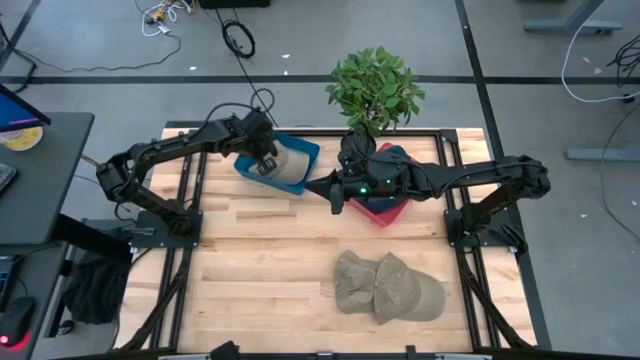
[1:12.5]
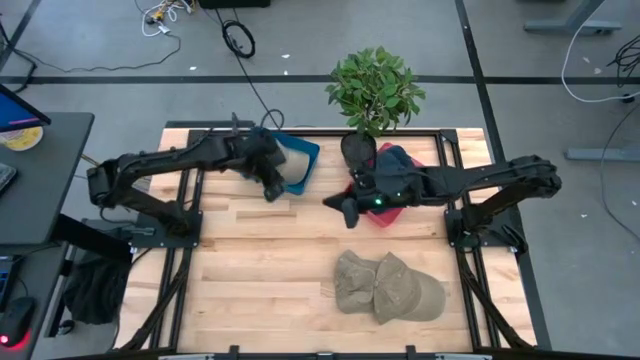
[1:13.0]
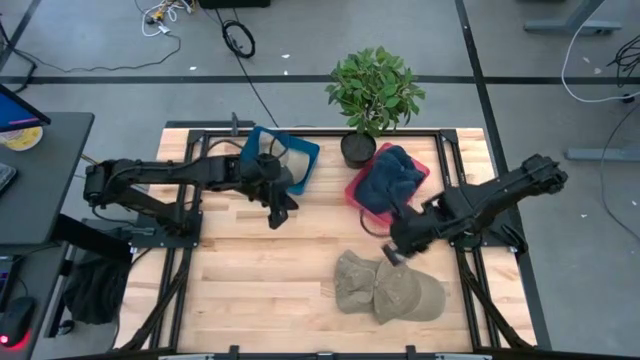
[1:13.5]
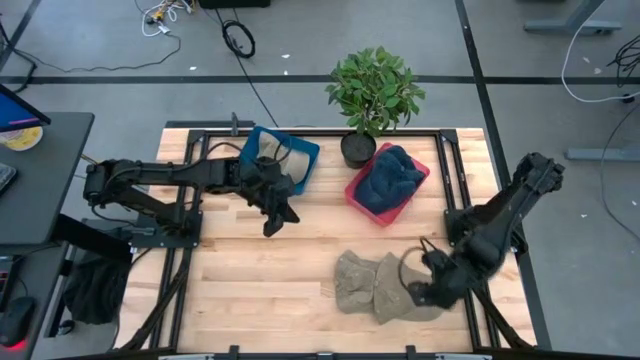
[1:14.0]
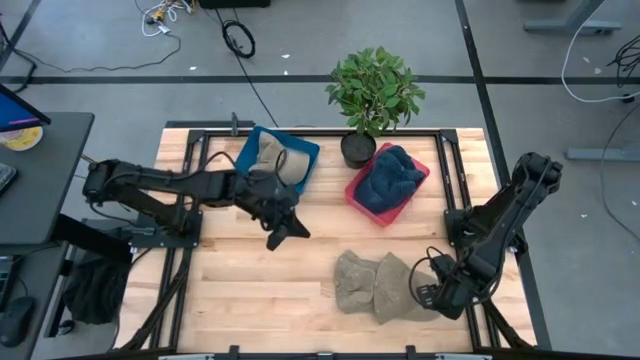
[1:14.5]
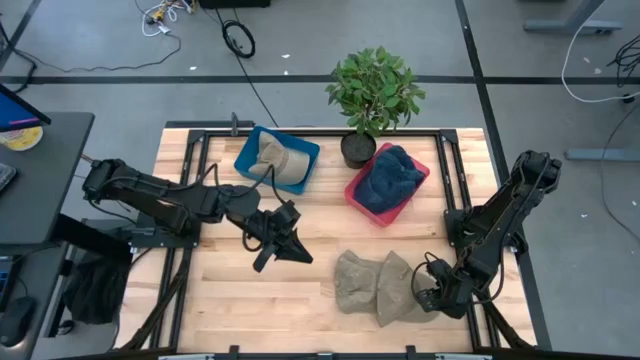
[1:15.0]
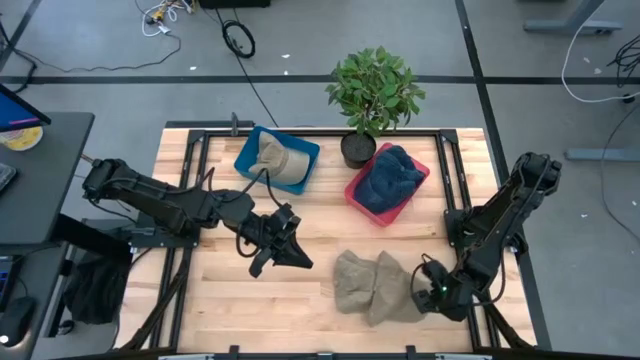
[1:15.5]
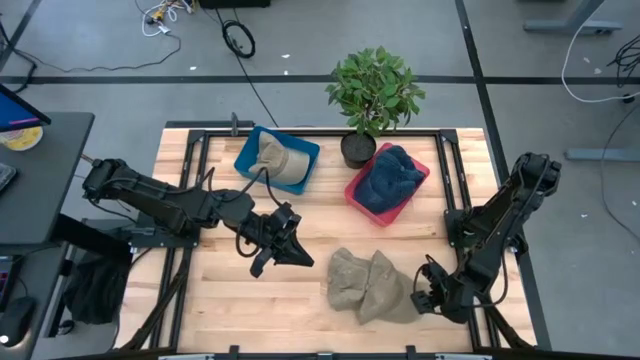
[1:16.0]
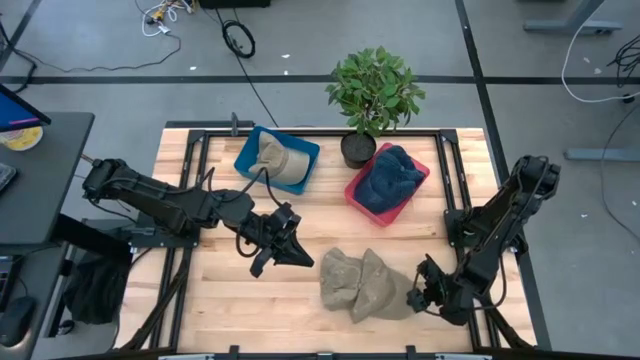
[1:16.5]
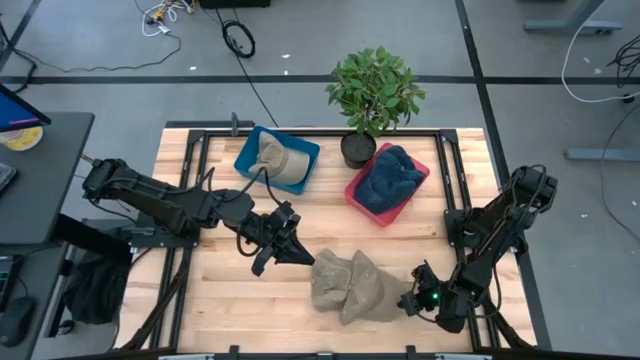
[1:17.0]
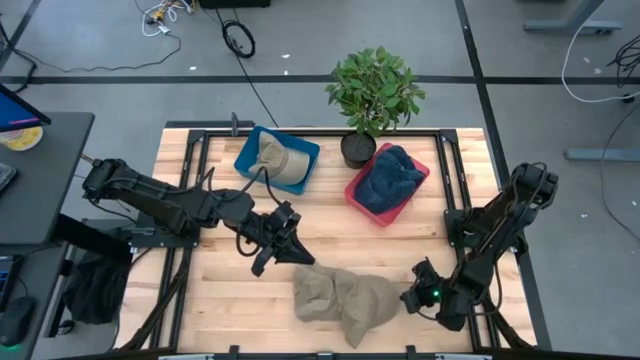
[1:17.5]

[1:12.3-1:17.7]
Task: Pick & Place hat
Put the right brown cap into the blue bin

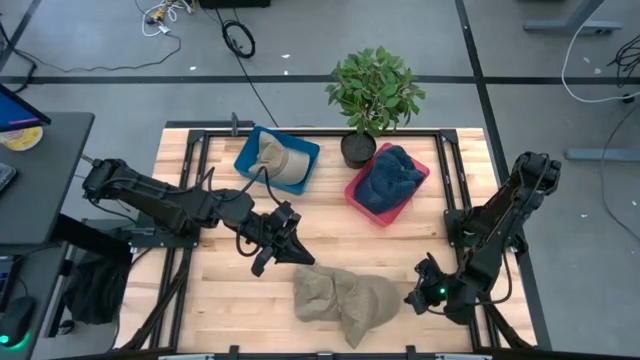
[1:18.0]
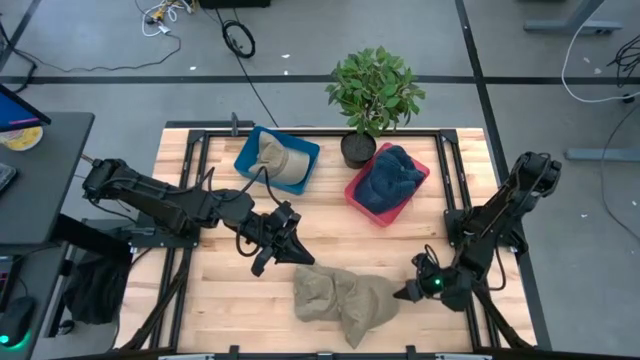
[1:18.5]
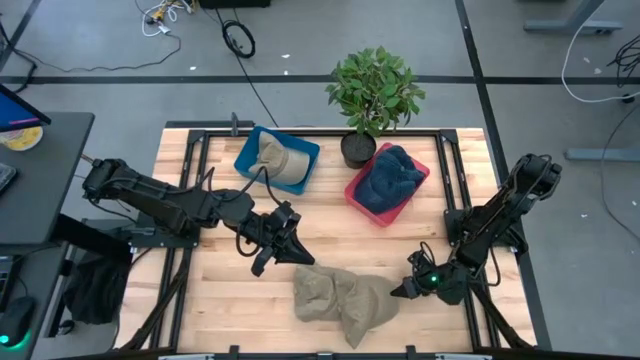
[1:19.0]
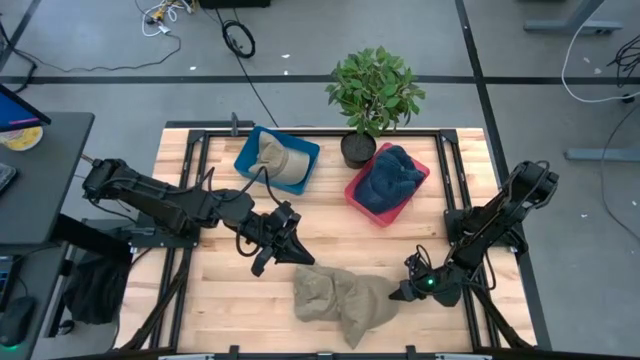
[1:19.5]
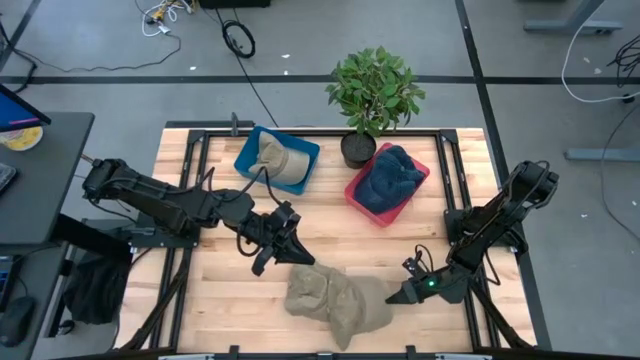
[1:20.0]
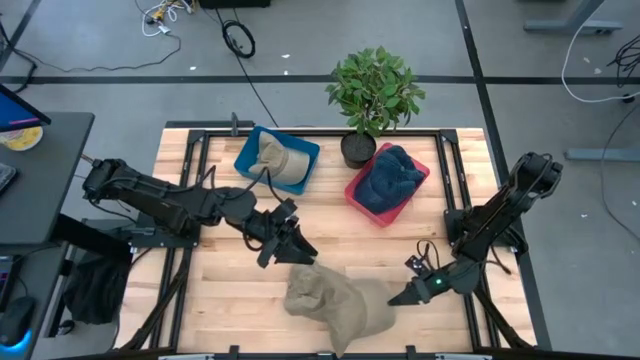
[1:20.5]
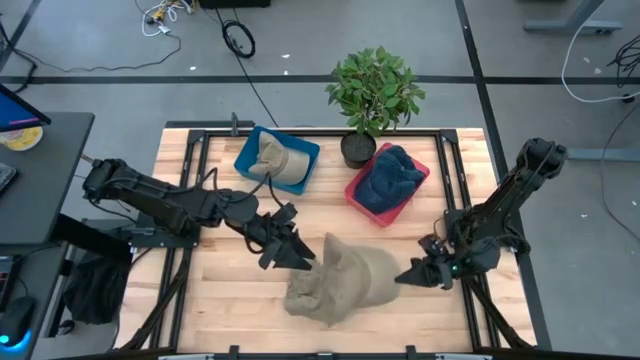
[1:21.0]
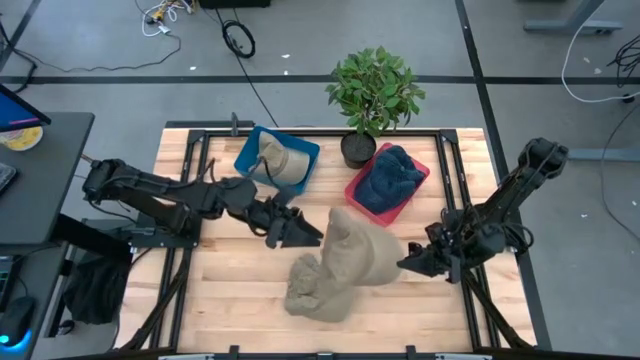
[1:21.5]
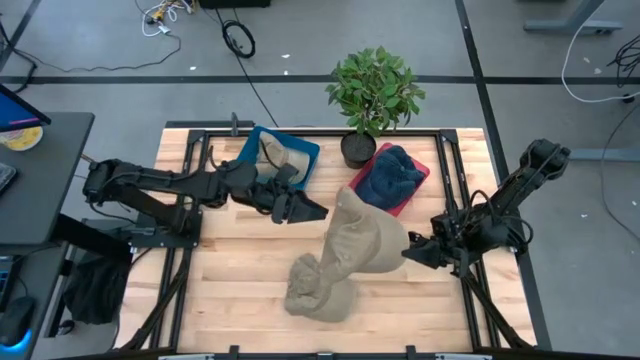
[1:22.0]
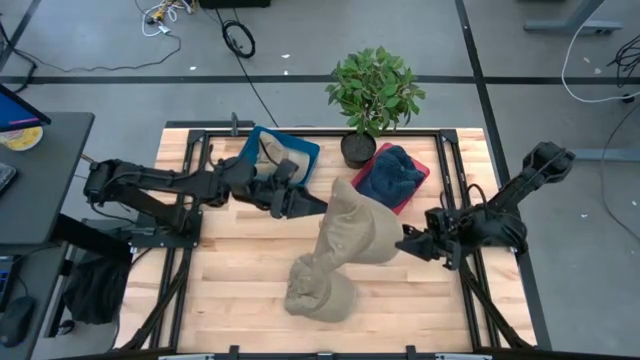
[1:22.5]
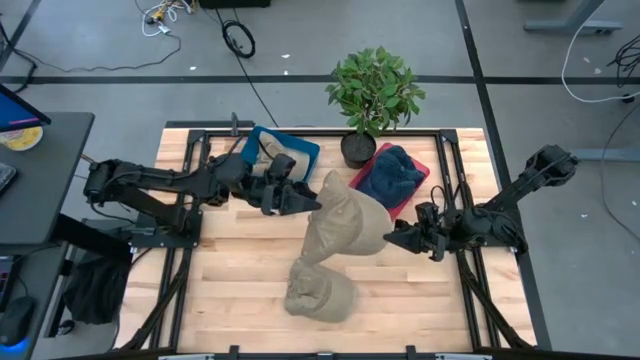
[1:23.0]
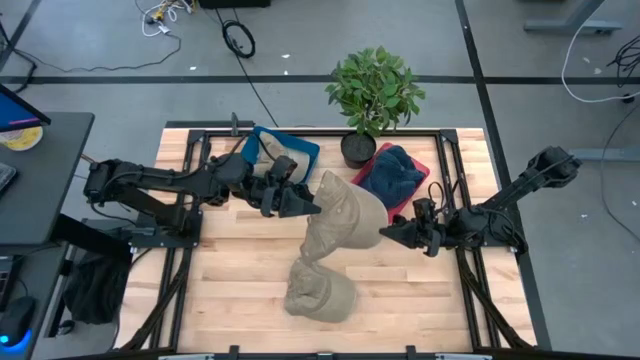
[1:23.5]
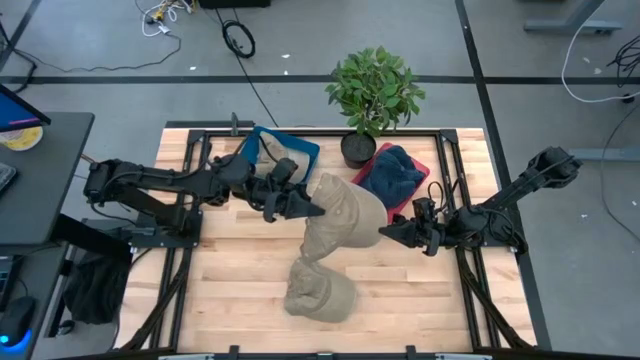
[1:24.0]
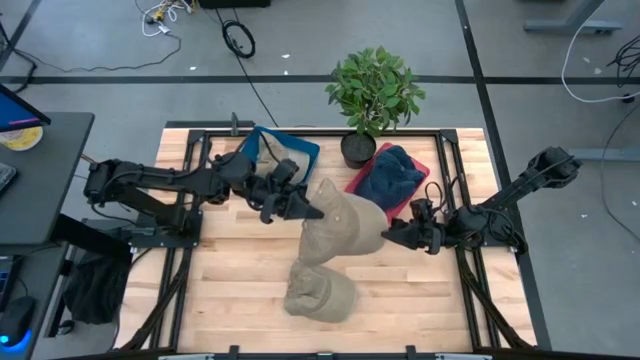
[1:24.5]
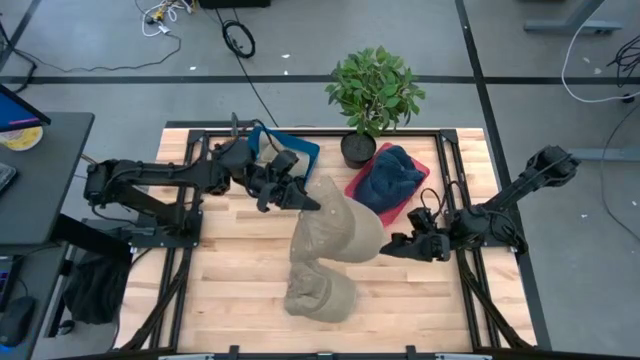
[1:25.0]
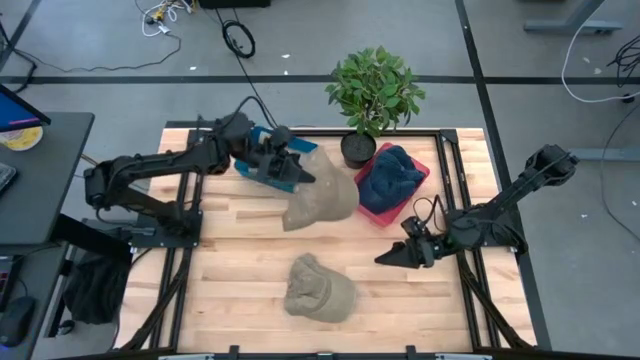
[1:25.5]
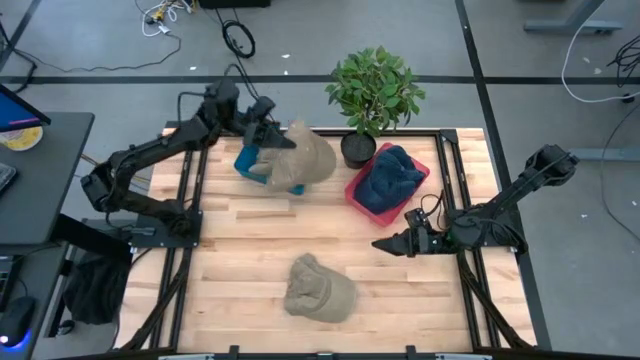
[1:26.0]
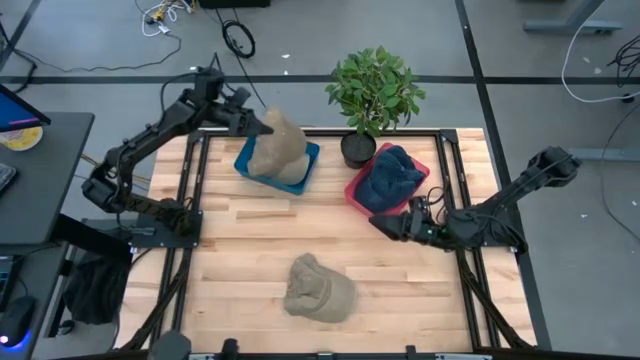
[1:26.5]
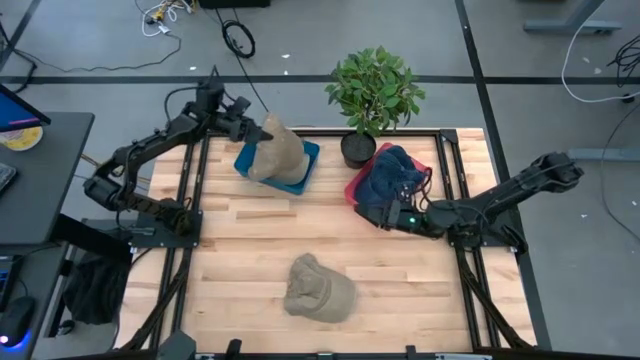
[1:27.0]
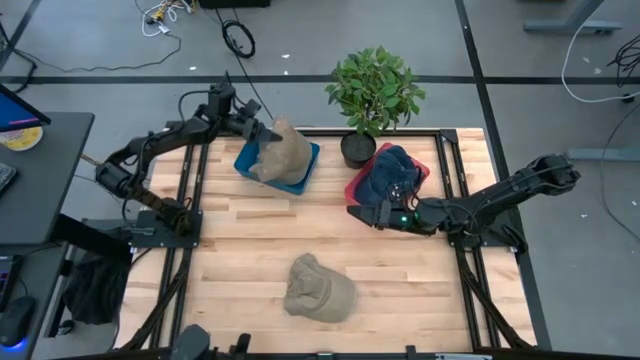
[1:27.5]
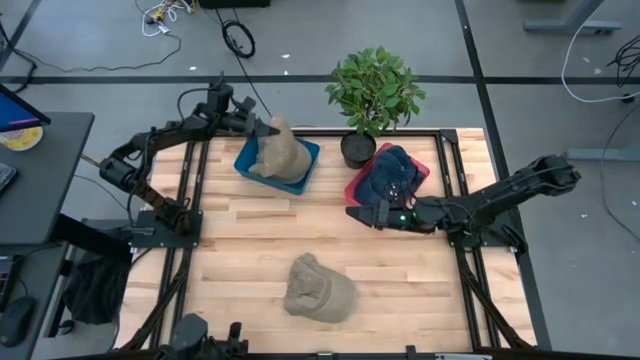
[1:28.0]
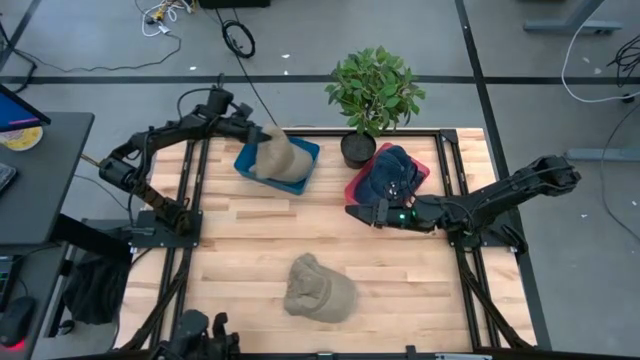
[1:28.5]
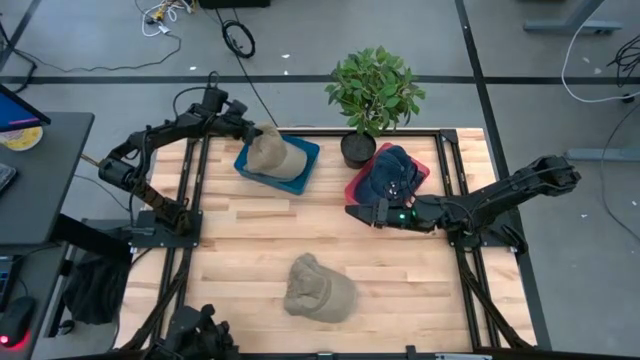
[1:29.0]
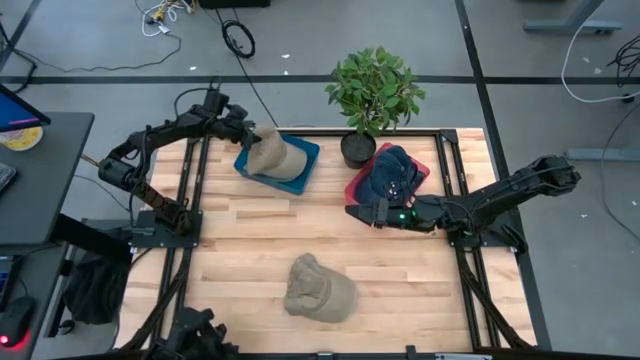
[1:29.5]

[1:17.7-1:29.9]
Put the right brown cap into the blue bin

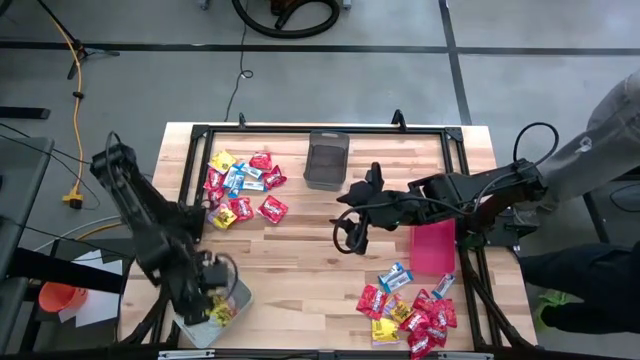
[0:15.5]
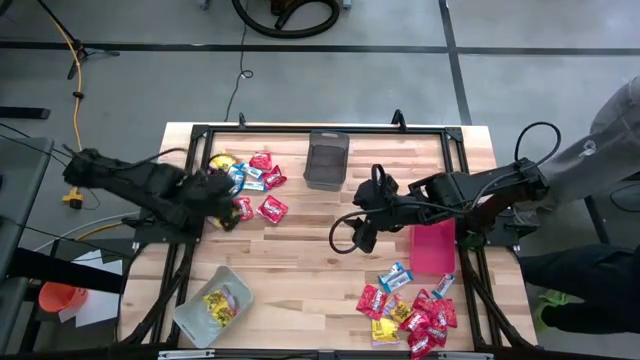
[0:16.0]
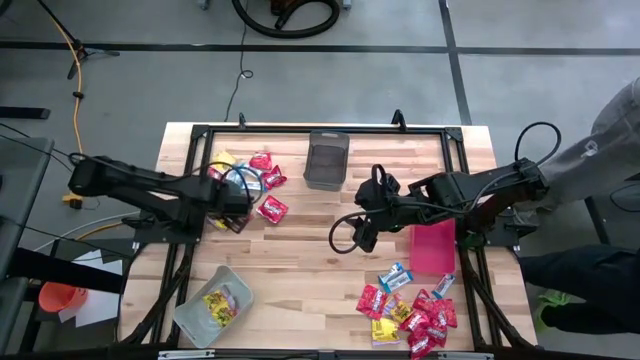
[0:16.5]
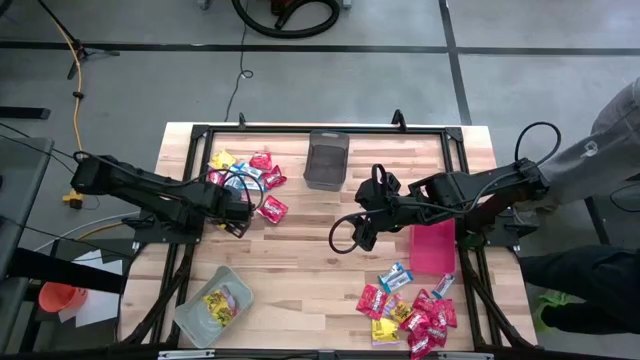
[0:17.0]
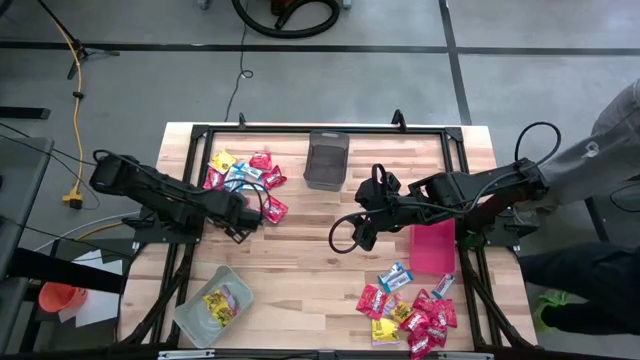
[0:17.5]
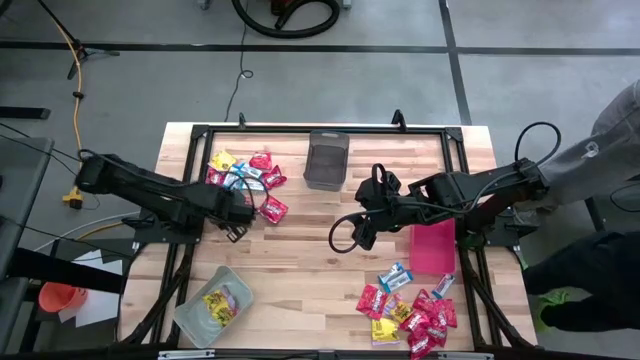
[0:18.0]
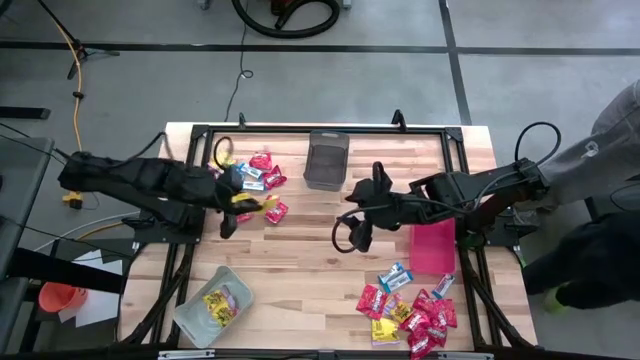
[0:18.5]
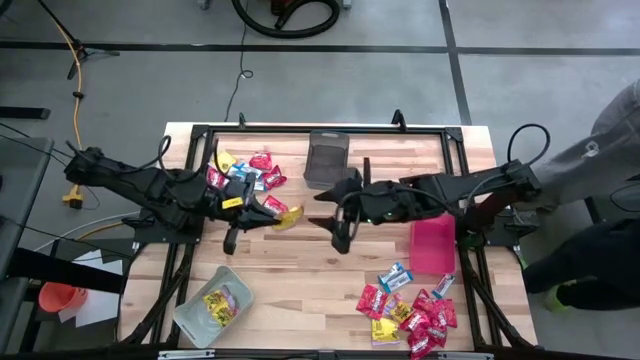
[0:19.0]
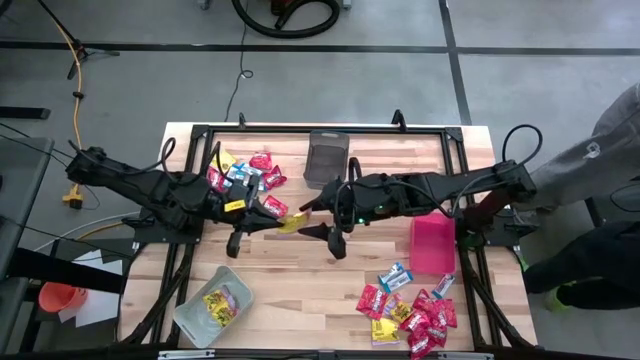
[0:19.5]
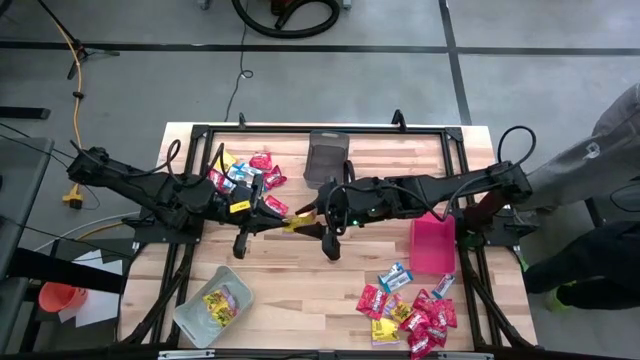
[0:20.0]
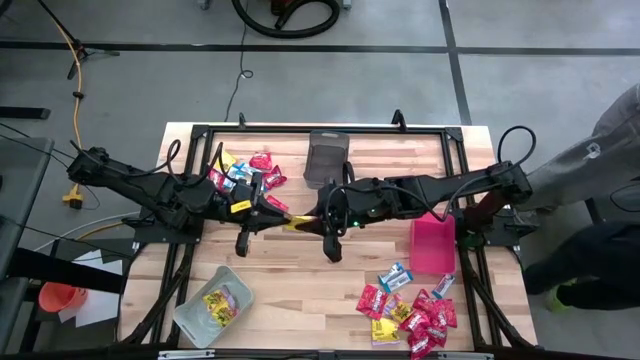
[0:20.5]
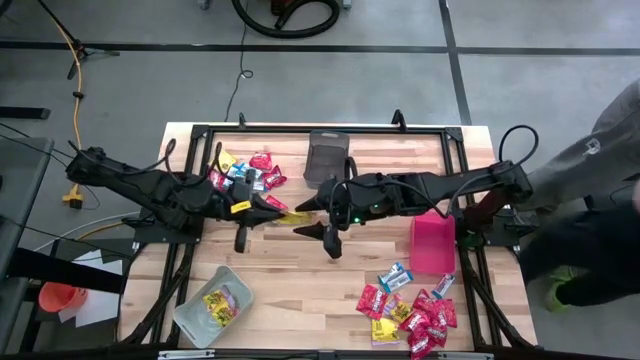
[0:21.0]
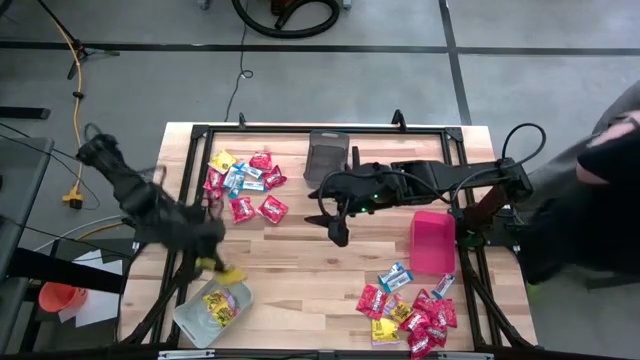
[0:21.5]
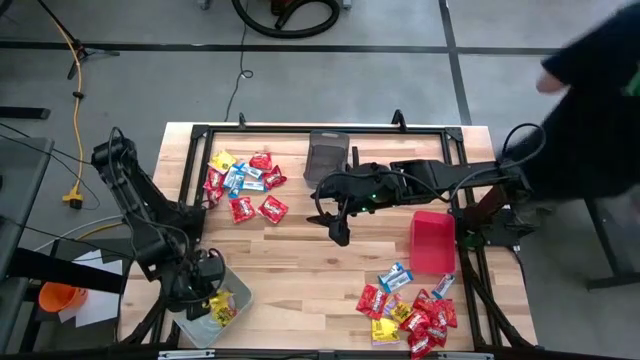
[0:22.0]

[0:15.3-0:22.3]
Task: Sort candy
Put the yellow candy pack into the gray bin
